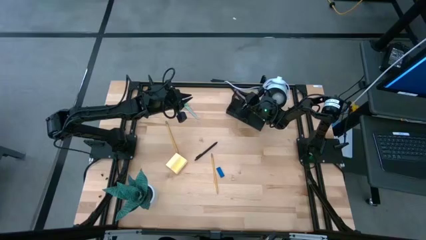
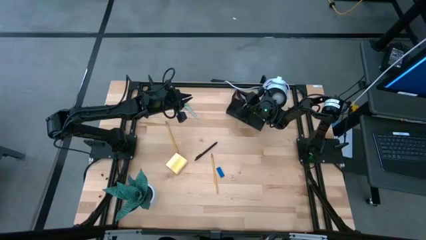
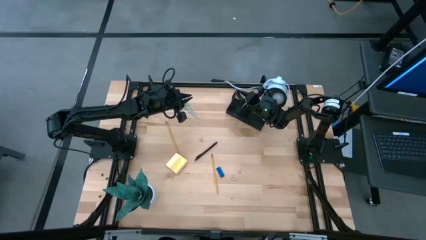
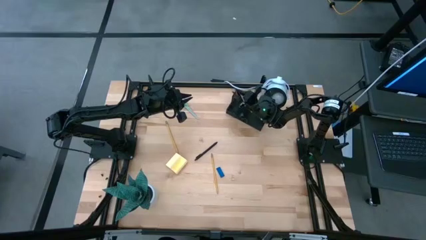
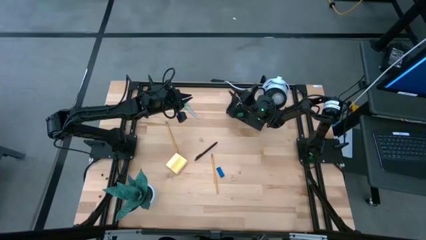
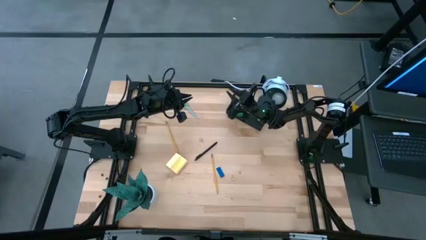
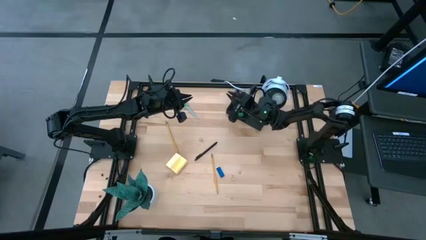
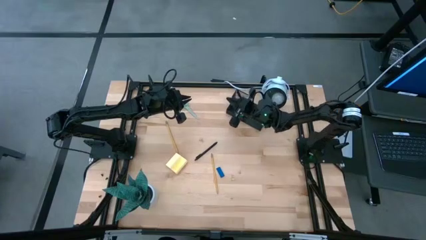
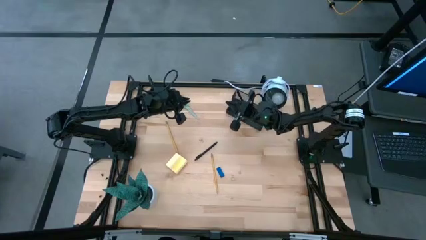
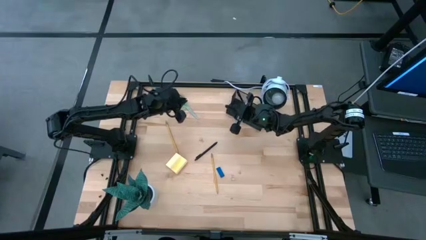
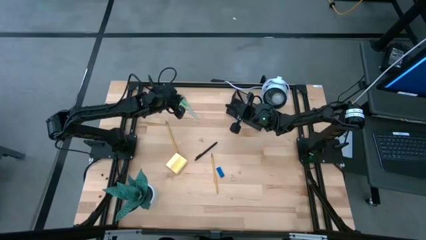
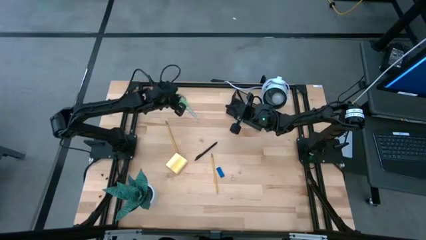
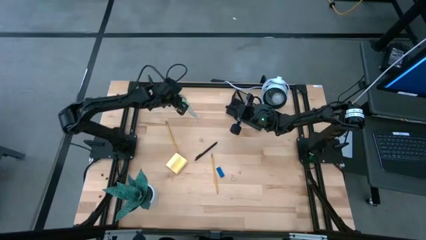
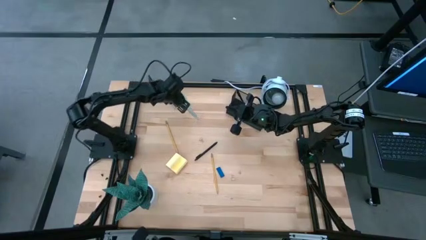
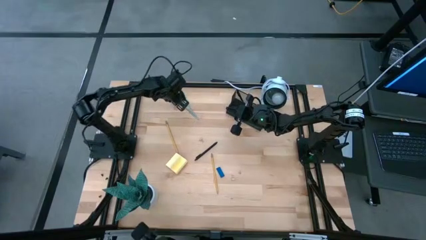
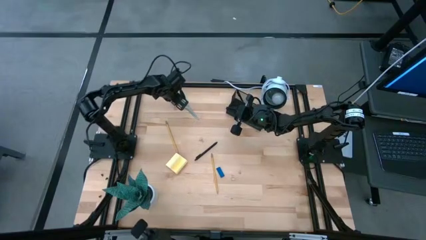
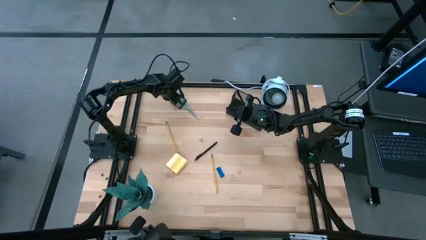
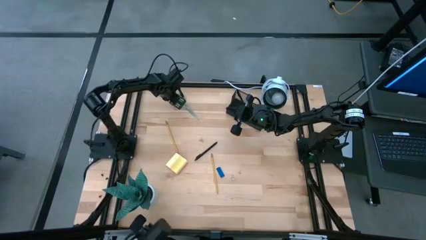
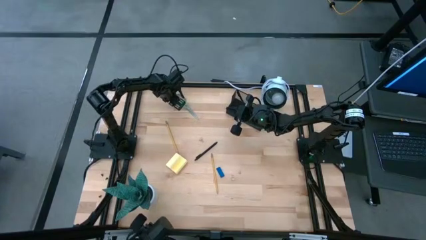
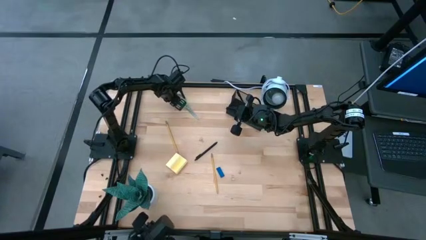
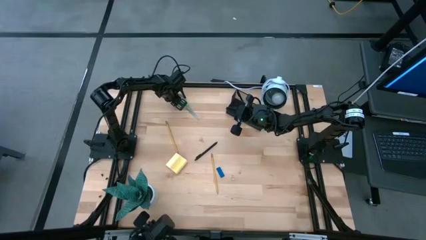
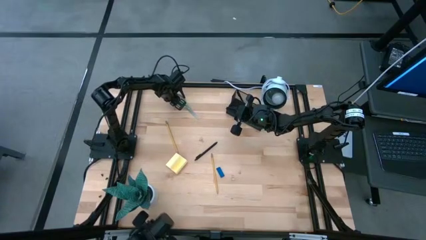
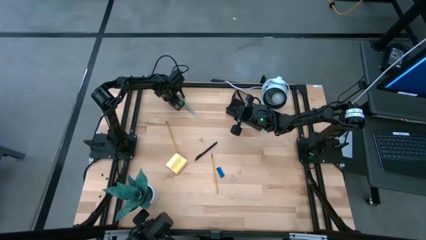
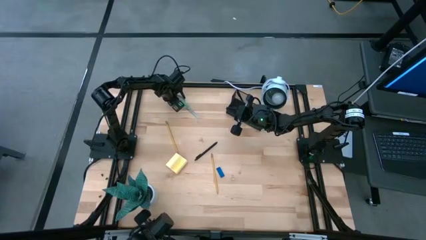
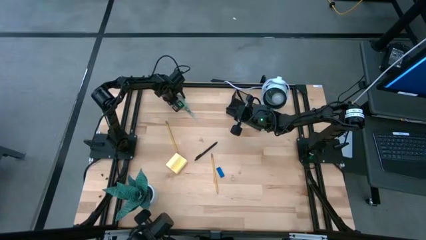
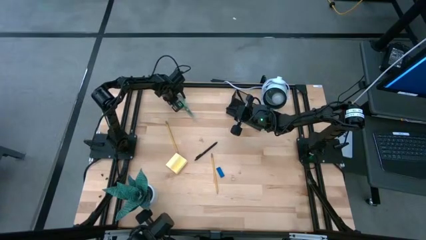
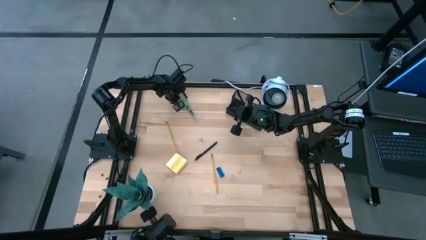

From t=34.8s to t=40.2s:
Task: Pick and place office supplies into organizer
Put the green scissor into the metal mesh desk organizer

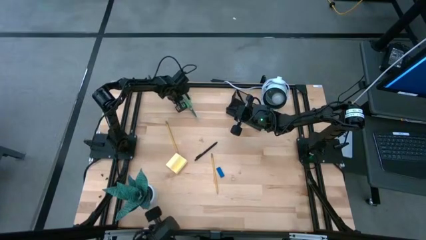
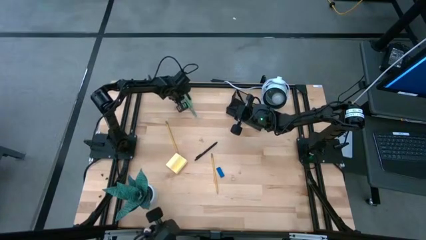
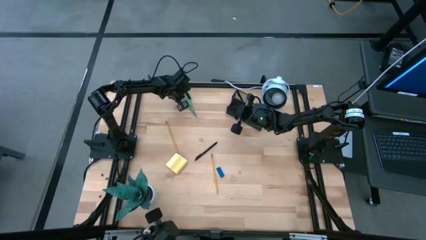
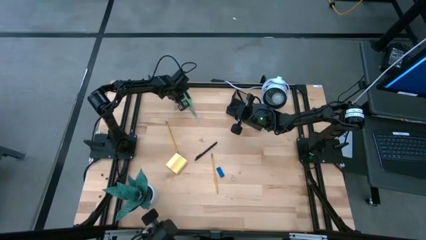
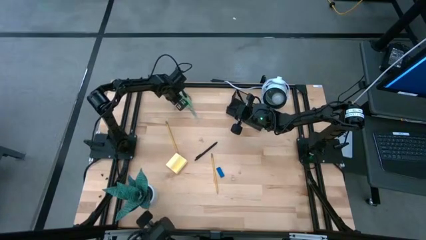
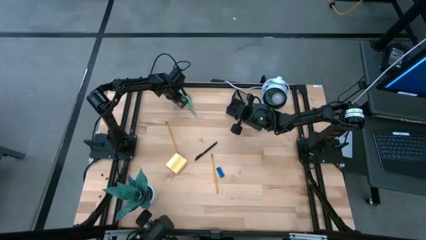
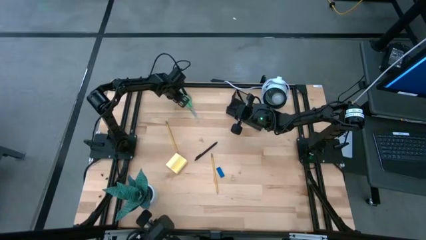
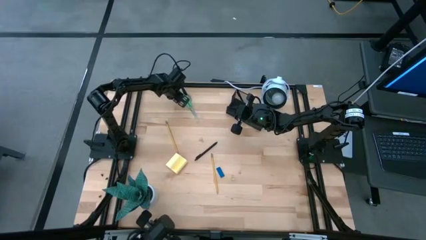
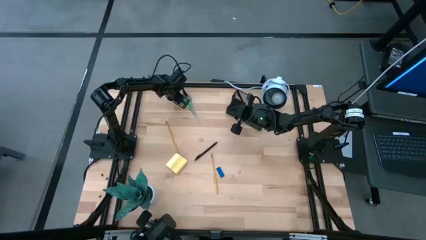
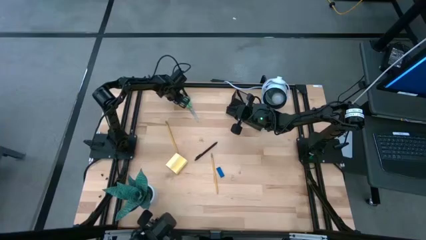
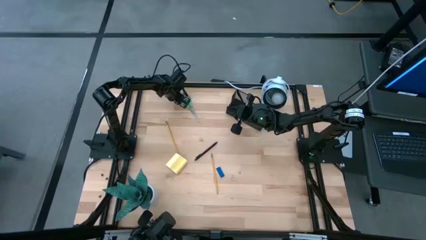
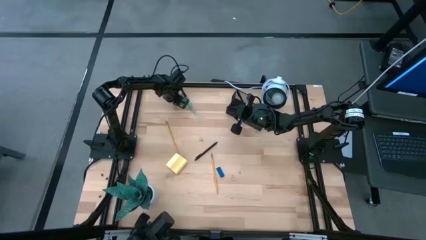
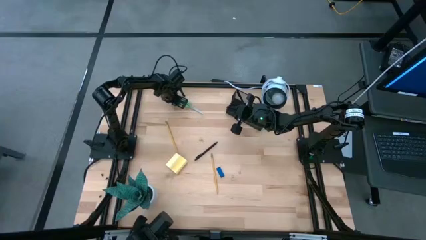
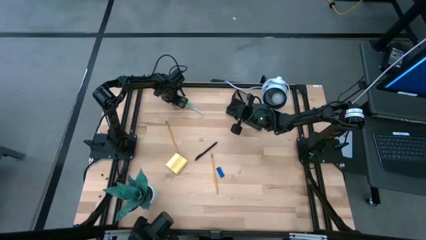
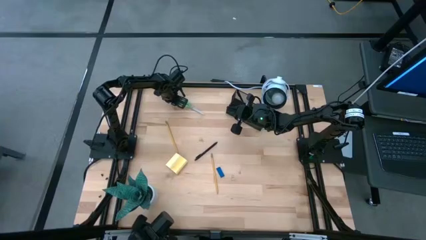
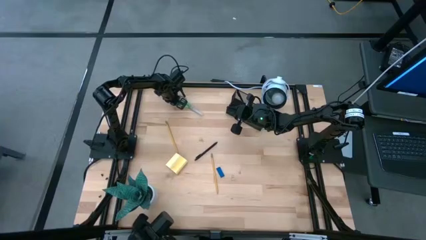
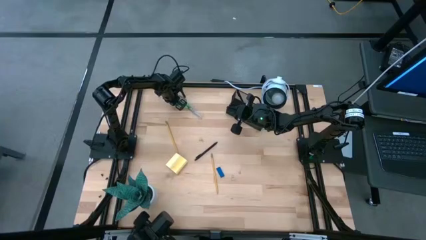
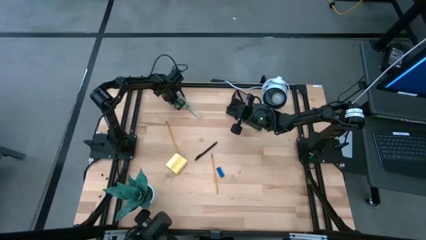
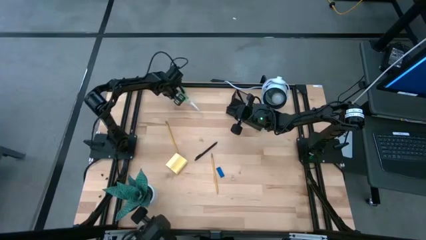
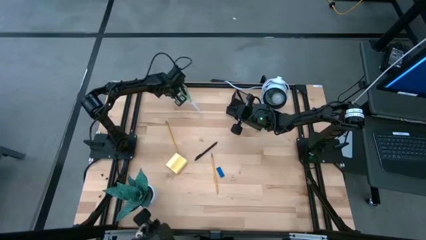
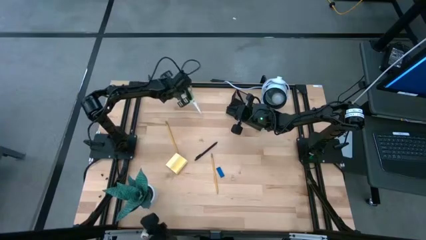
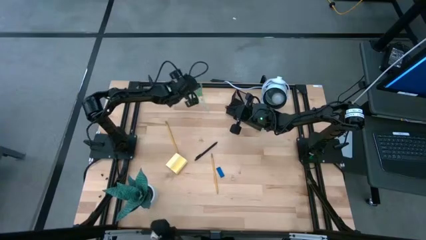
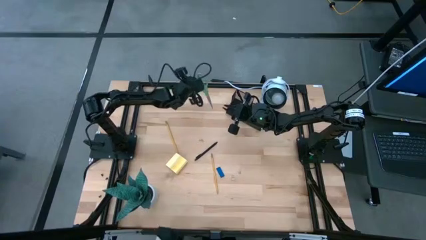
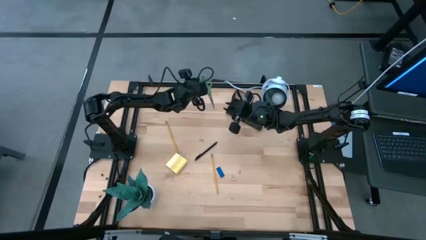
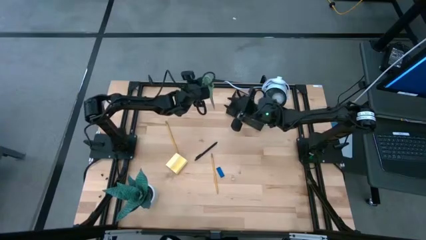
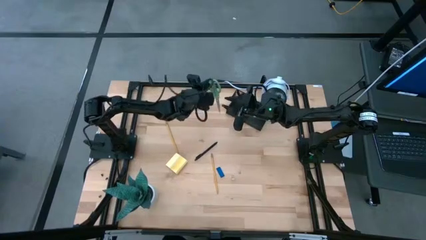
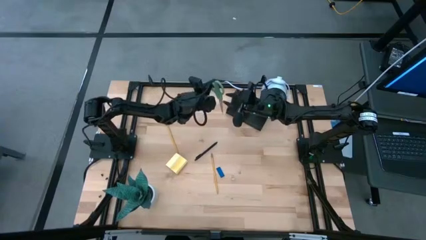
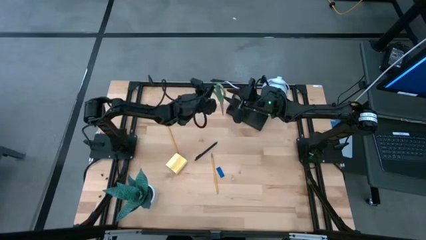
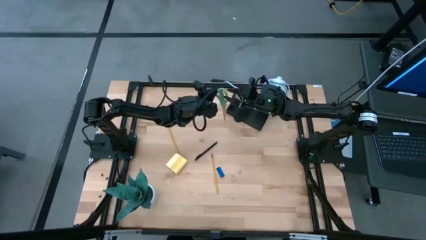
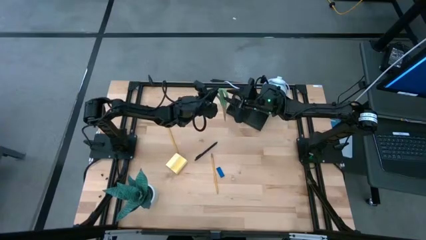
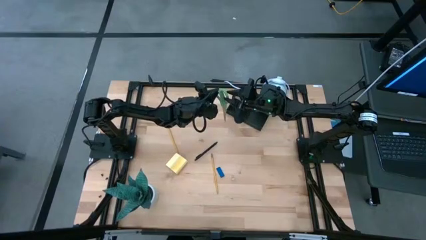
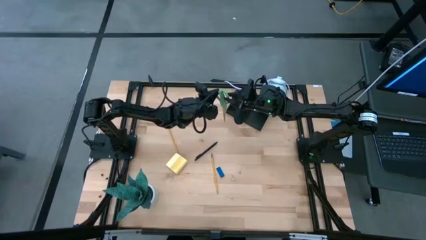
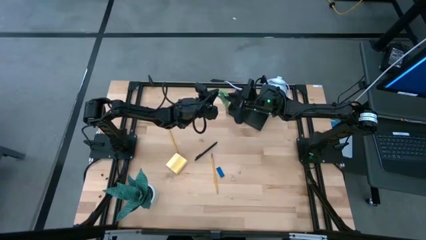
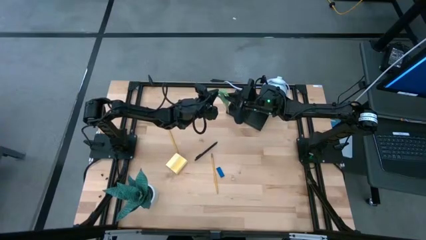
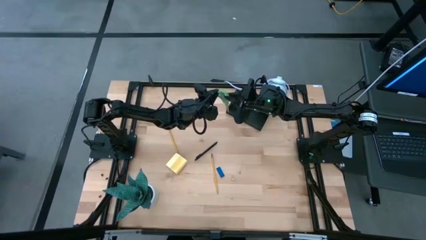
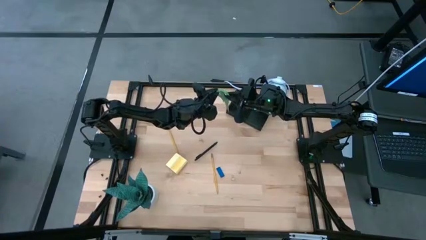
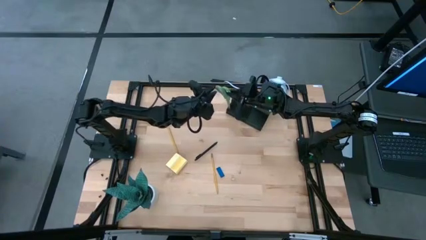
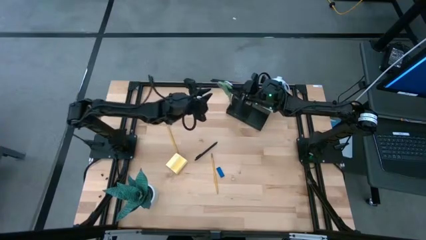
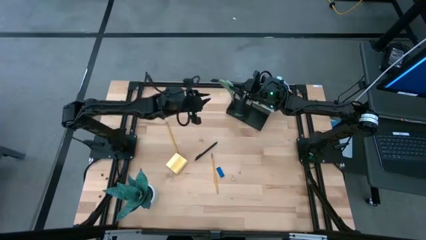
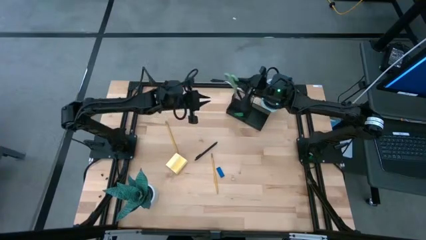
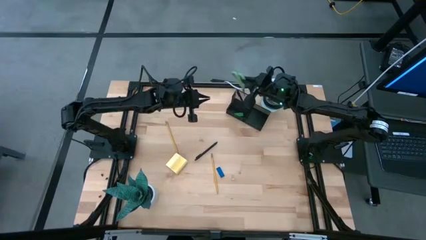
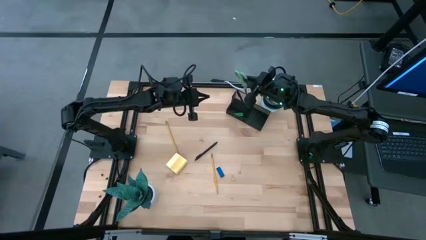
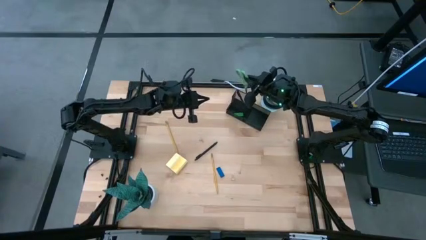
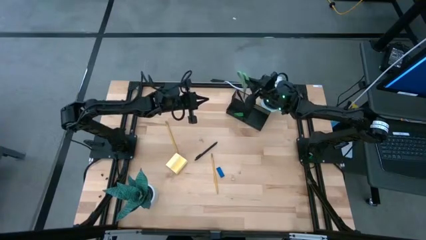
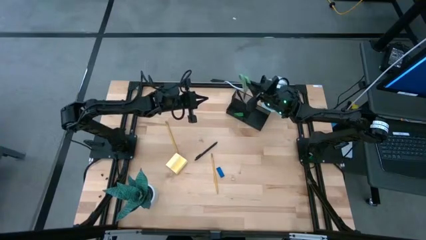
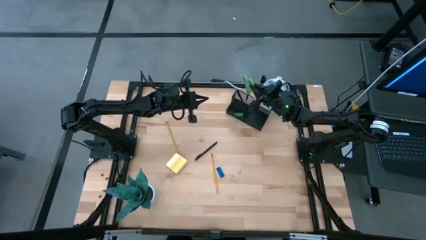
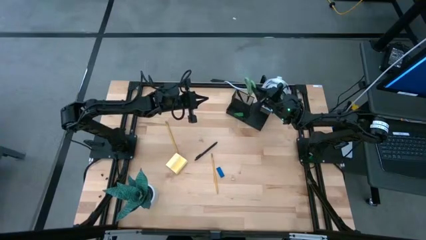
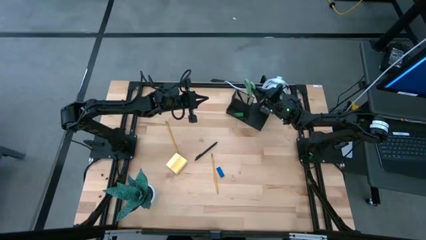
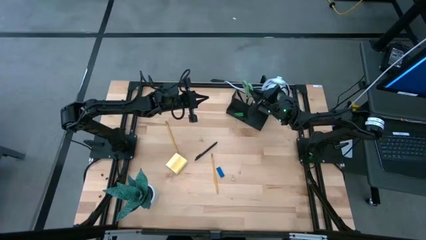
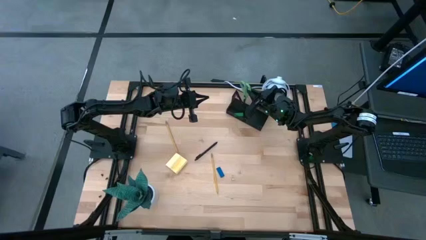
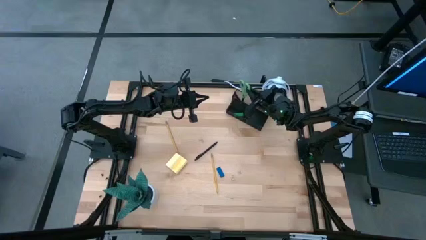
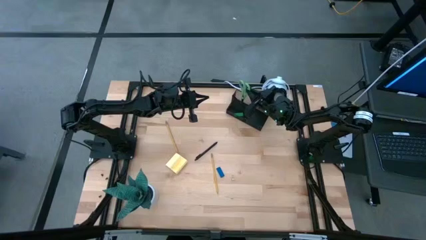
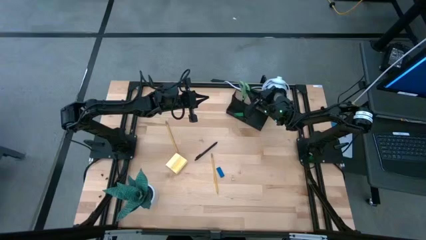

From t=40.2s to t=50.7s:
Put the green scissor into the metal mesh desk organizer
